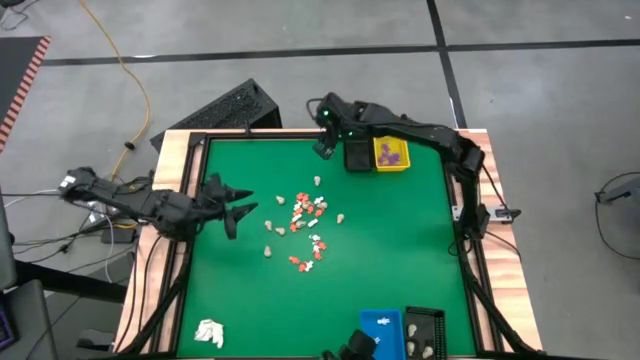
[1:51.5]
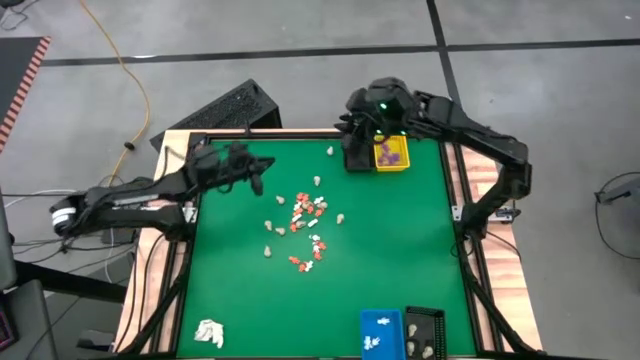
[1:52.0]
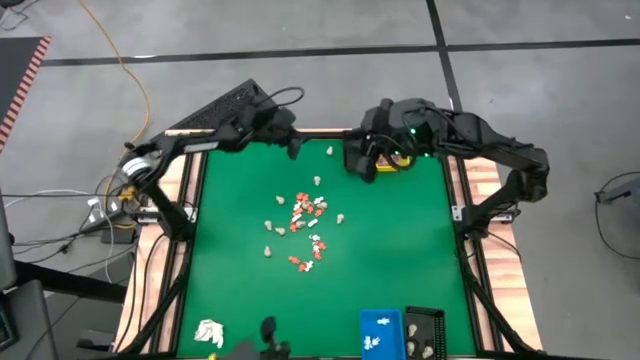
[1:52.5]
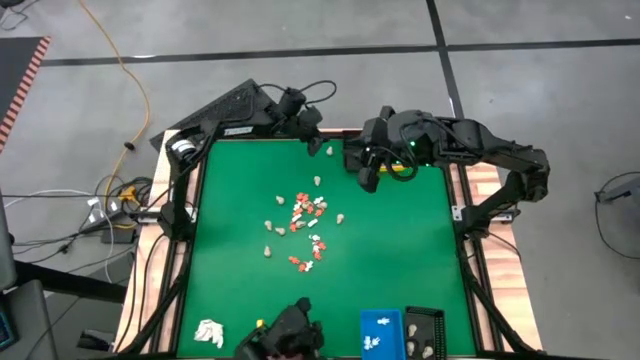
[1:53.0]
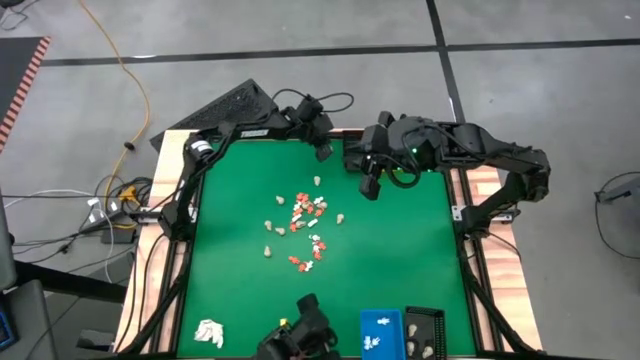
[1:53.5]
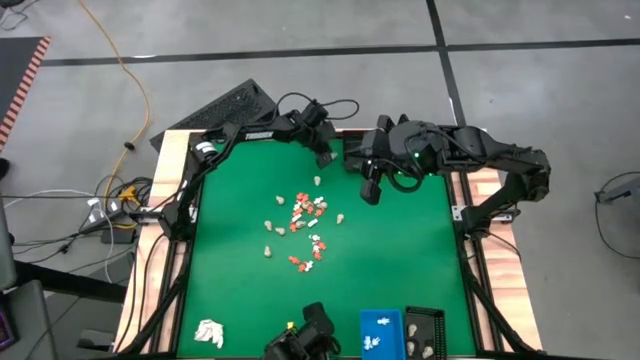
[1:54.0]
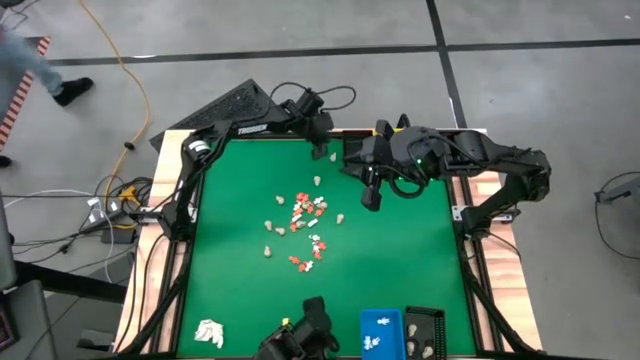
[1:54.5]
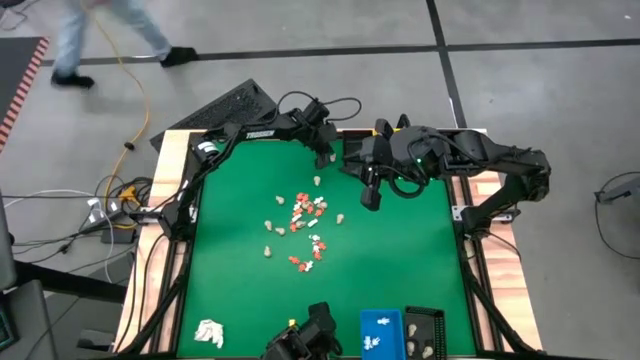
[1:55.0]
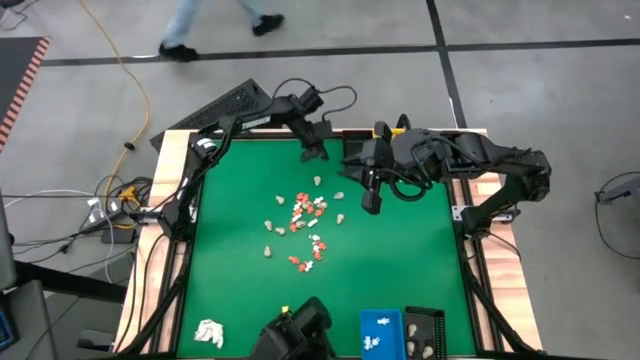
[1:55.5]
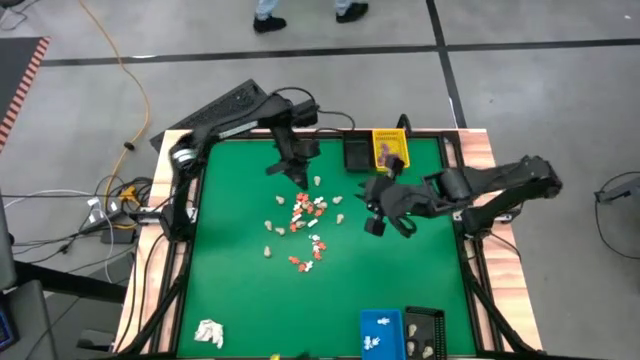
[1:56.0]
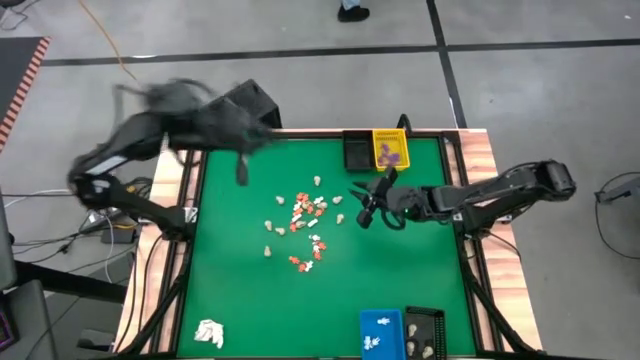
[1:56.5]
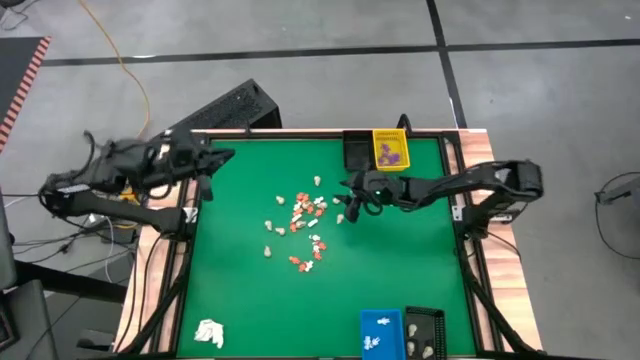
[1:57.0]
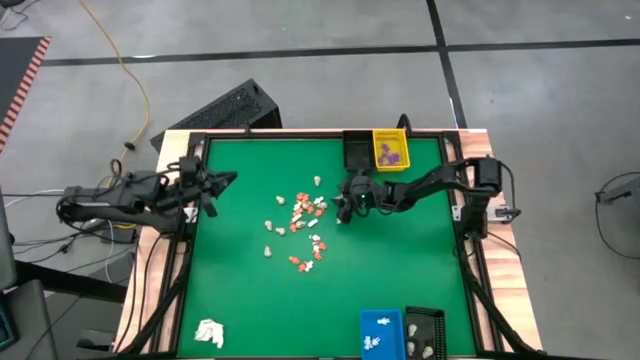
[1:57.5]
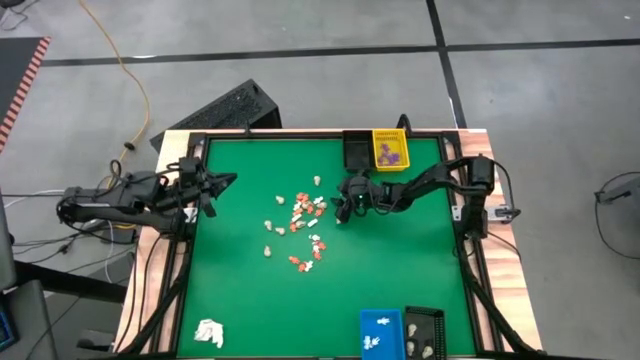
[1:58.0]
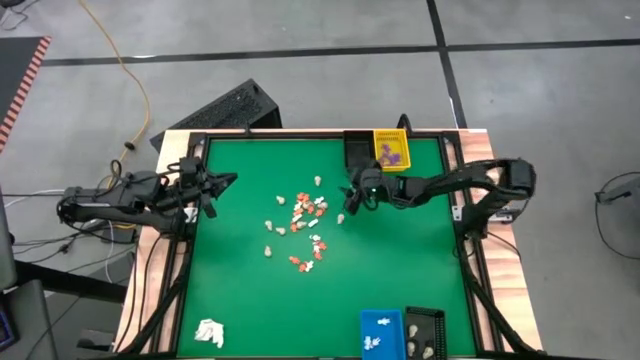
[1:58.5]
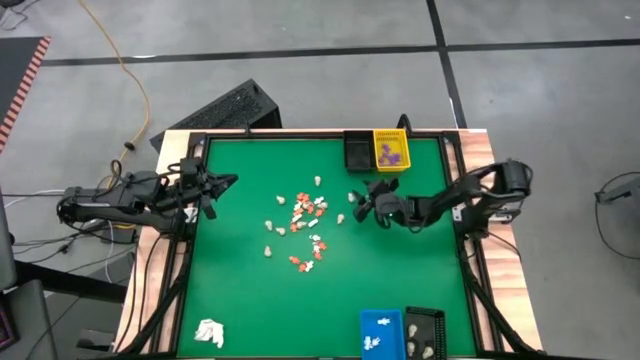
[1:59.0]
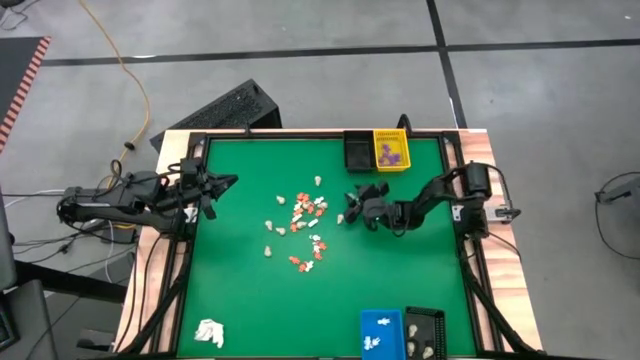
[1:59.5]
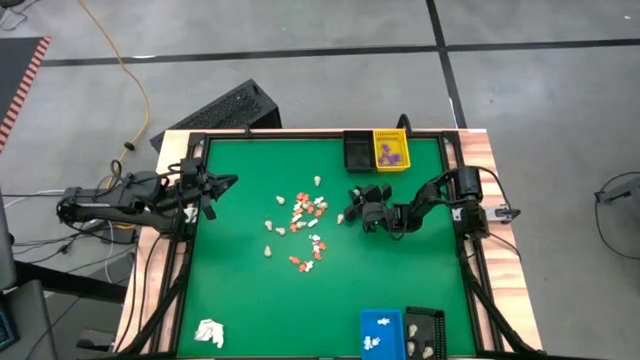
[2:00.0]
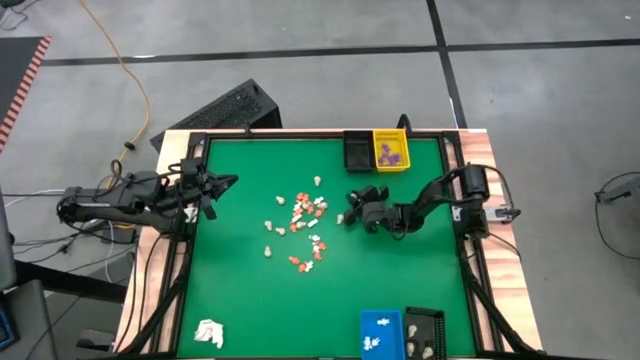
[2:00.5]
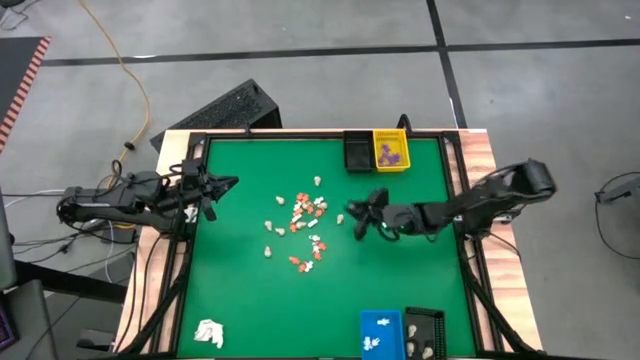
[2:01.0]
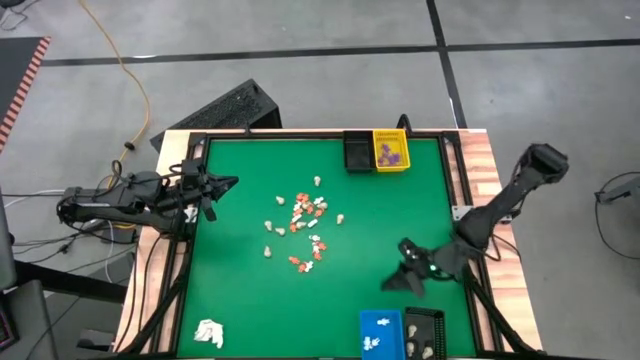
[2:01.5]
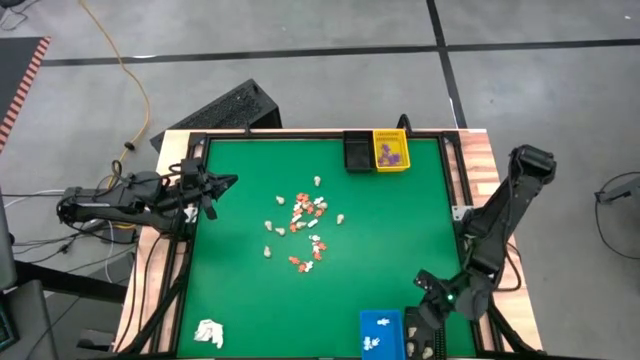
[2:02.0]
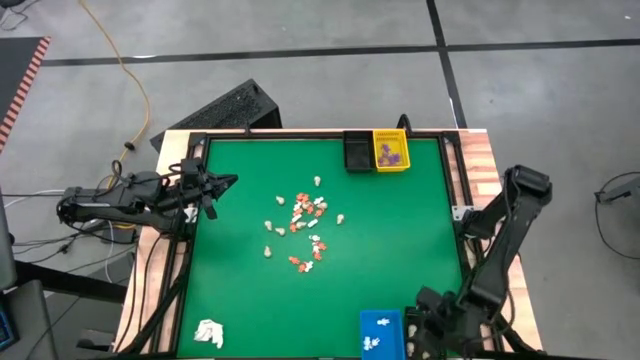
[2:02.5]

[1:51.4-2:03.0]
Task: Sort Halloween decoration
Put the white skull toy into the bottom black basket

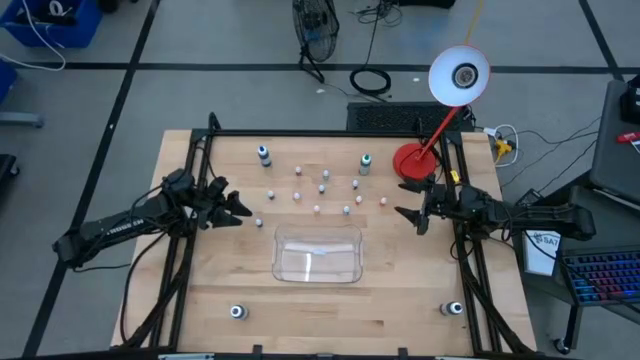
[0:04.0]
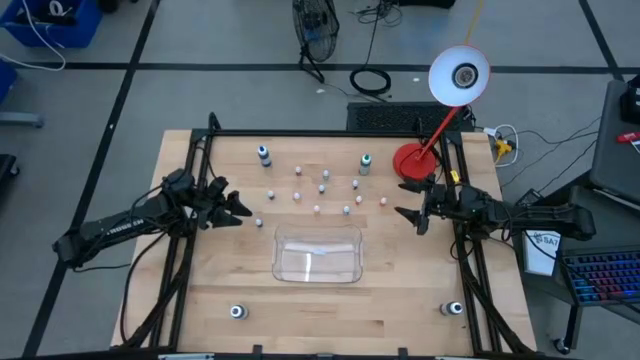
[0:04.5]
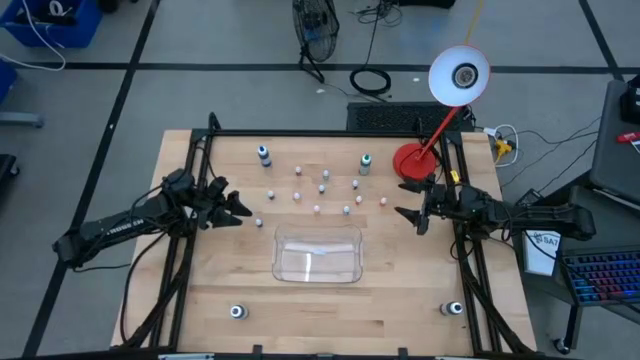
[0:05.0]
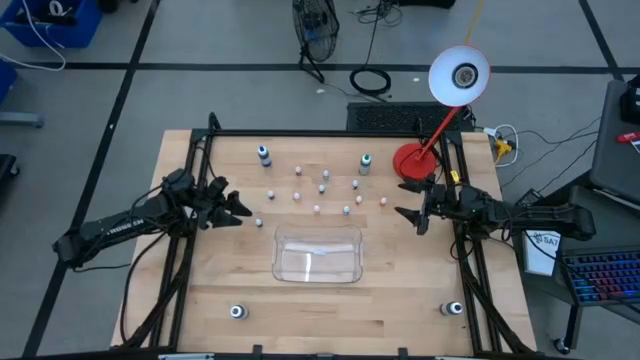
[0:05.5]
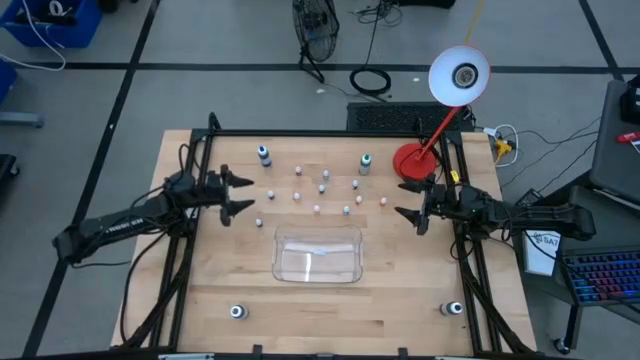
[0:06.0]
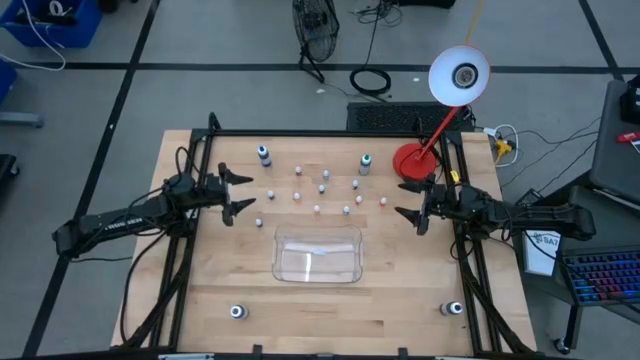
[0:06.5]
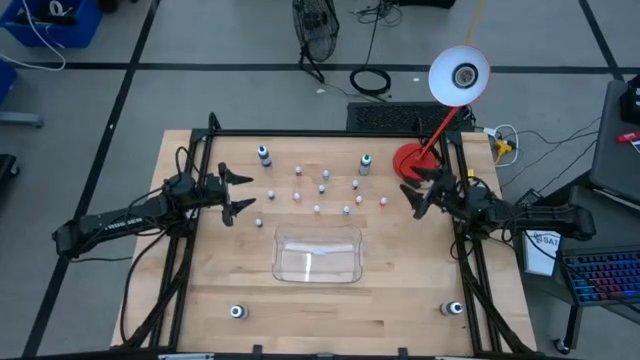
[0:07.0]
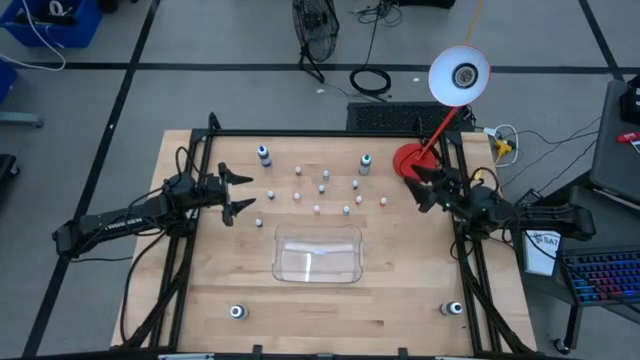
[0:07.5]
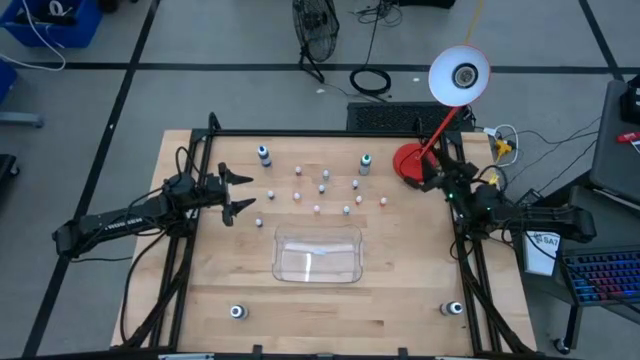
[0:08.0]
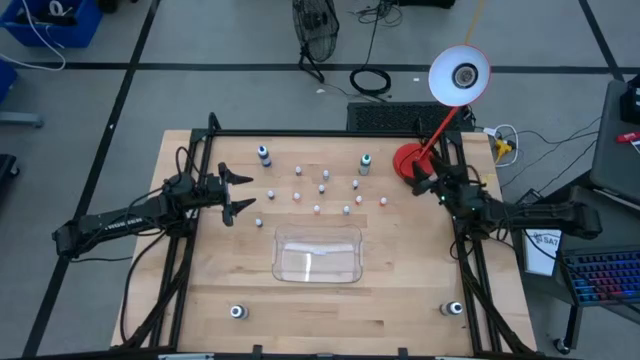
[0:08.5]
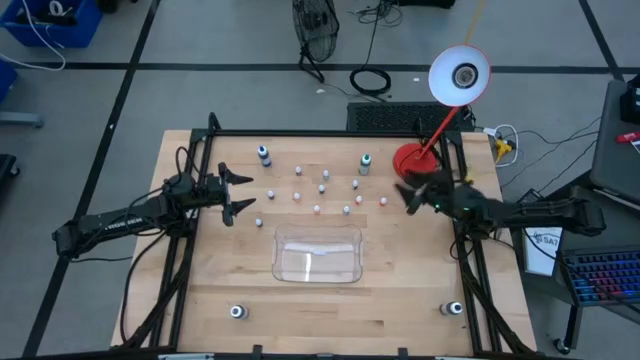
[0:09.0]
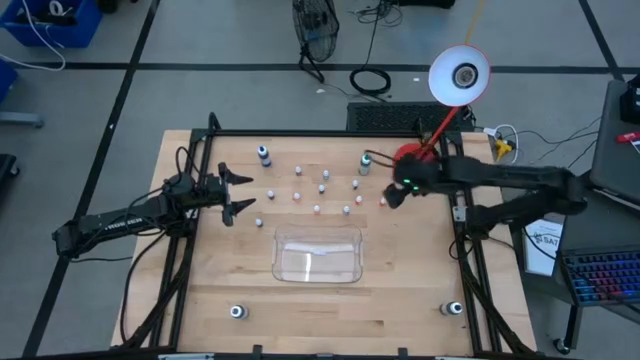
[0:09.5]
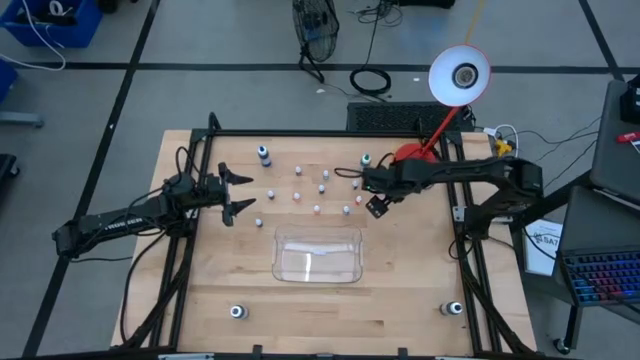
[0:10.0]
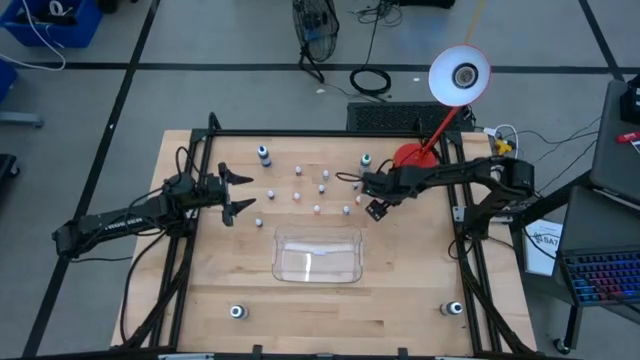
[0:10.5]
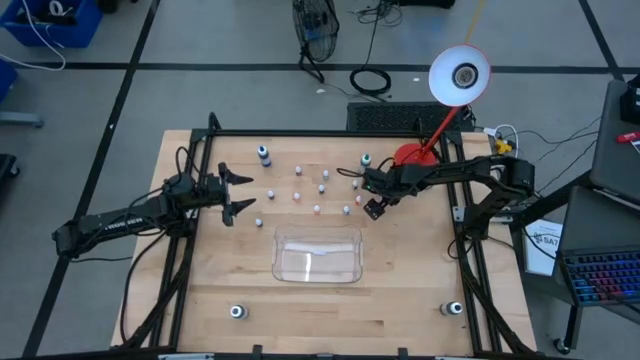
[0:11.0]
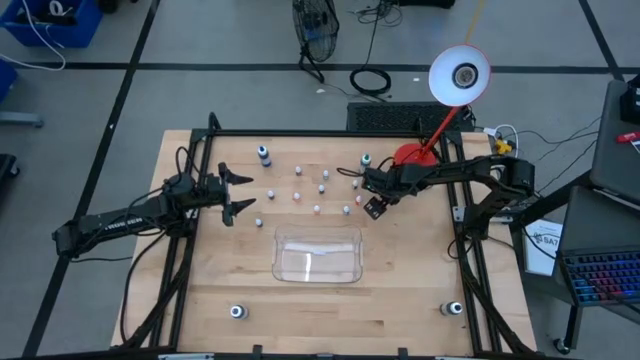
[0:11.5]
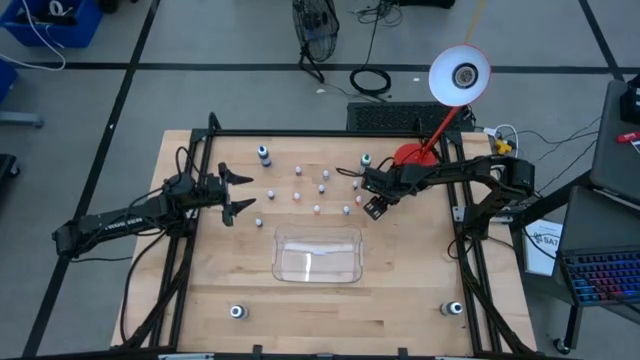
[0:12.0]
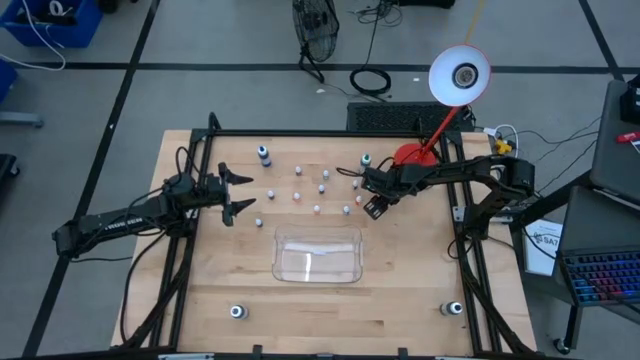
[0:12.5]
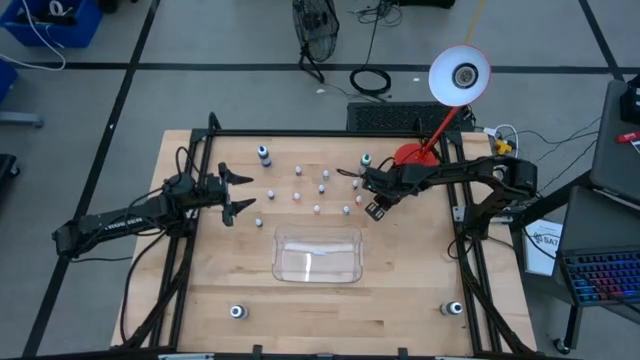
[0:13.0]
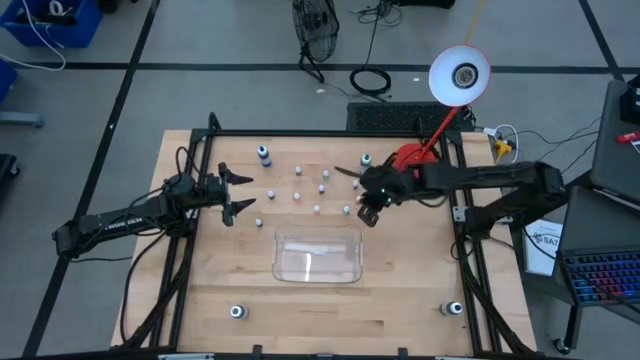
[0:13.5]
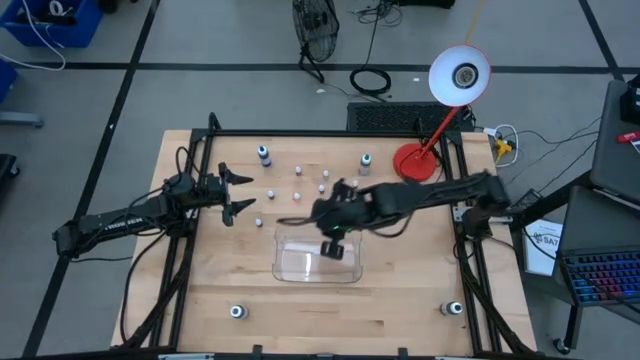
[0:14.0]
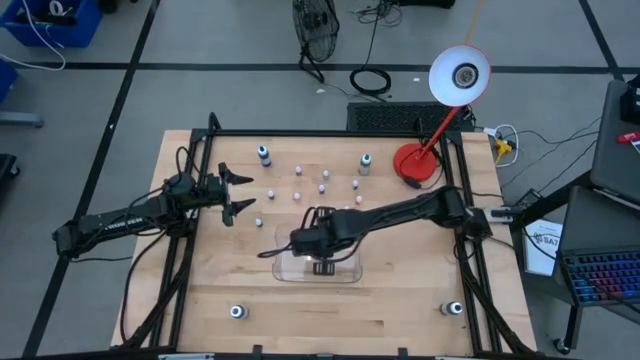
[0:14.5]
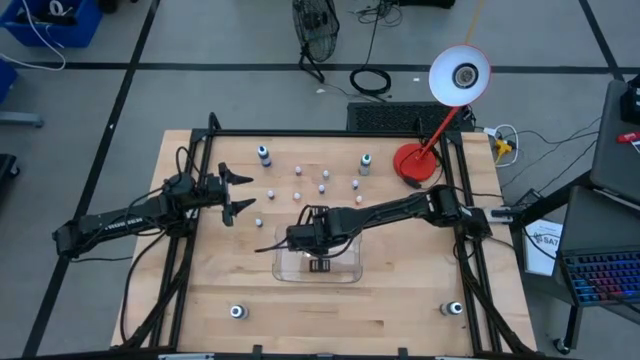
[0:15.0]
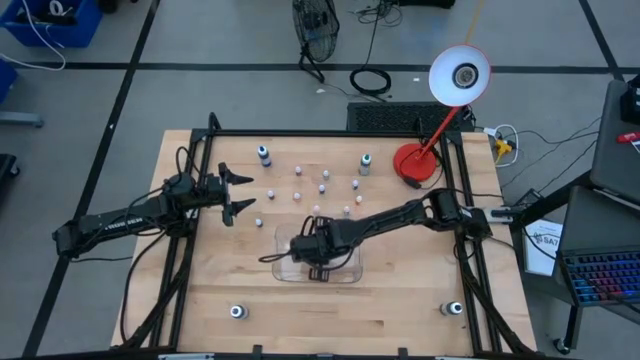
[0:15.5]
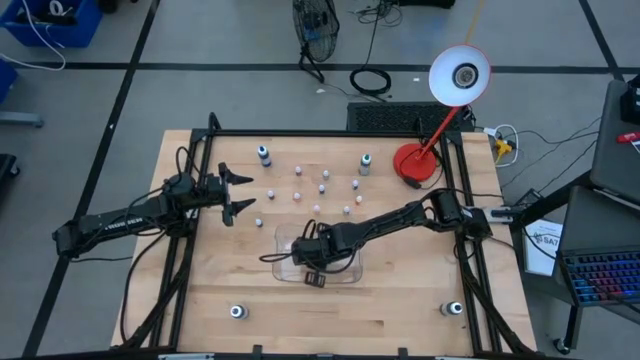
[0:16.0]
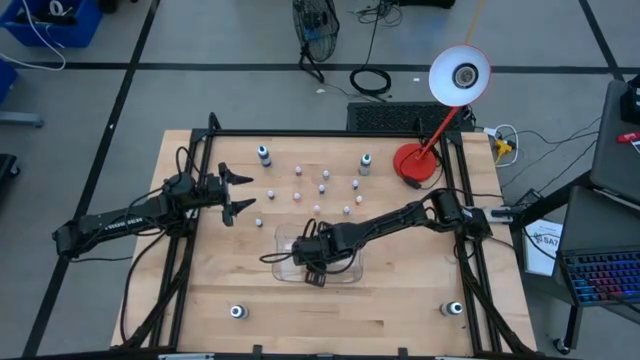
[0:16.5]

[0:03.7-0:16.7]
Task: Pick & Place food coloring
Put the small orange food coloring bottle into the transparent bin
